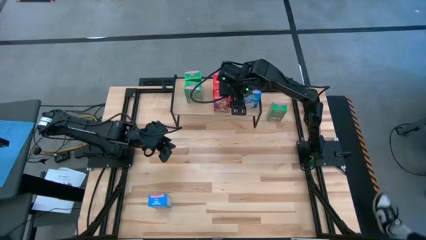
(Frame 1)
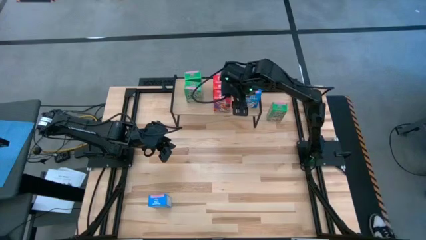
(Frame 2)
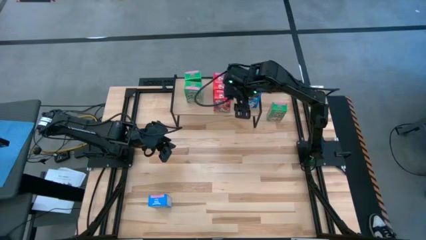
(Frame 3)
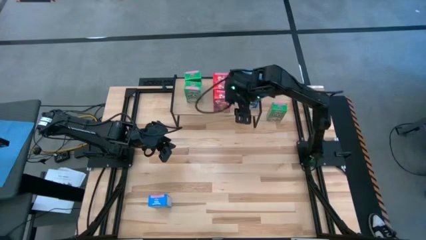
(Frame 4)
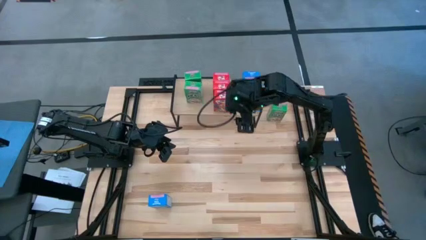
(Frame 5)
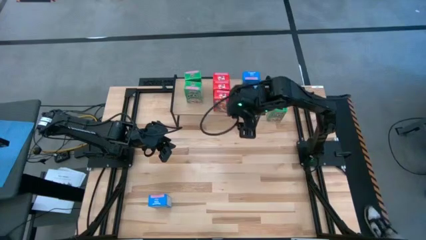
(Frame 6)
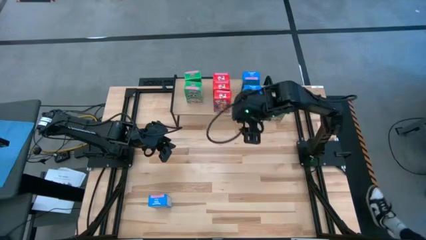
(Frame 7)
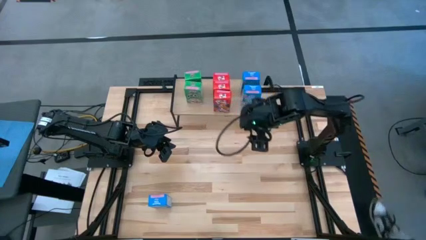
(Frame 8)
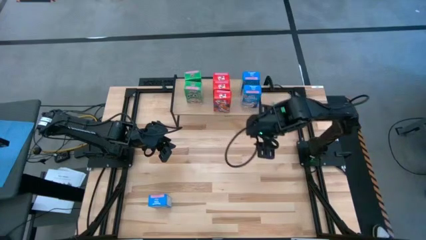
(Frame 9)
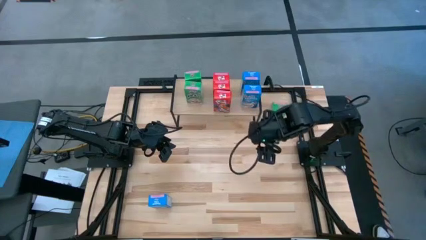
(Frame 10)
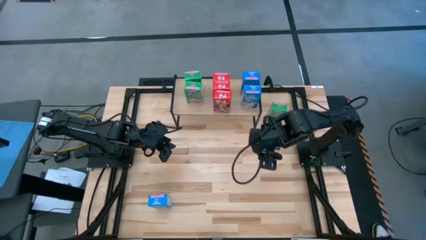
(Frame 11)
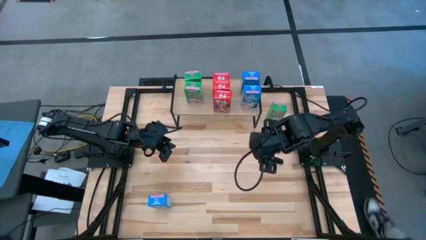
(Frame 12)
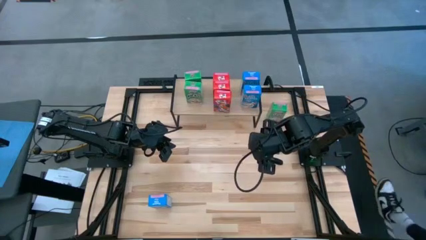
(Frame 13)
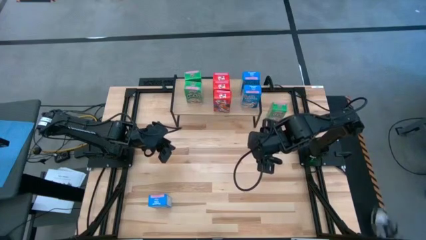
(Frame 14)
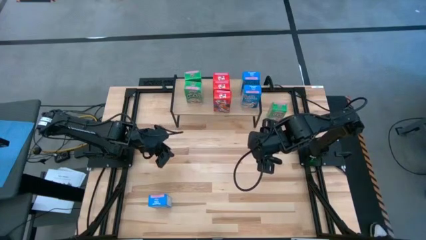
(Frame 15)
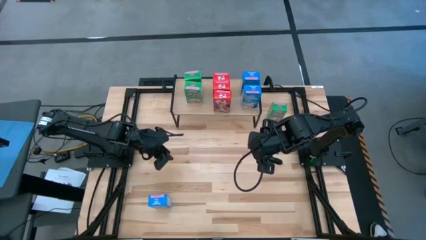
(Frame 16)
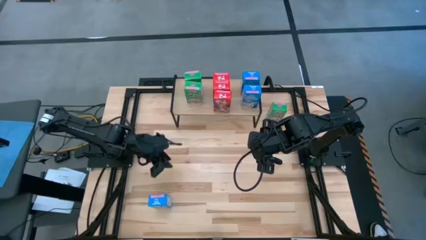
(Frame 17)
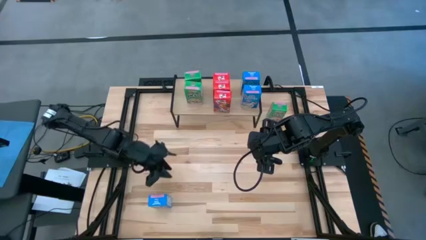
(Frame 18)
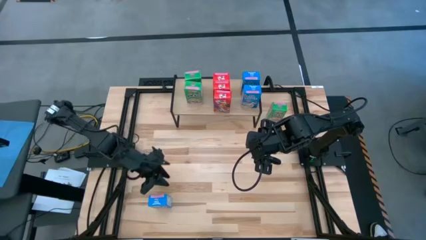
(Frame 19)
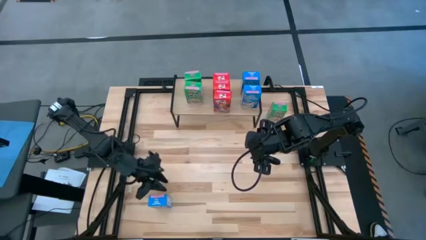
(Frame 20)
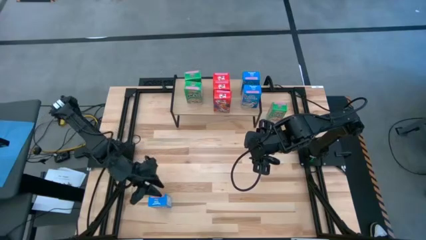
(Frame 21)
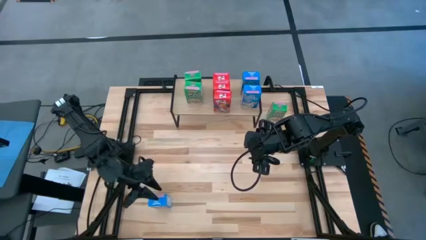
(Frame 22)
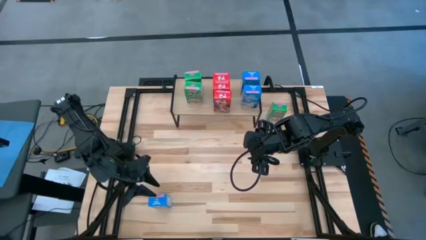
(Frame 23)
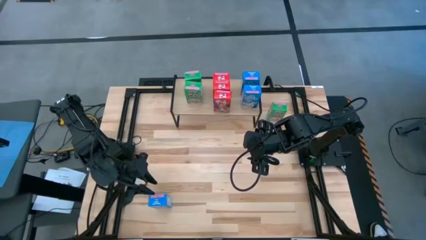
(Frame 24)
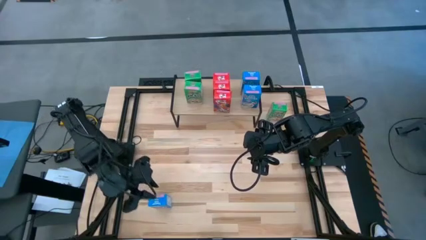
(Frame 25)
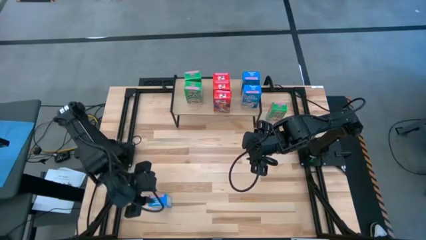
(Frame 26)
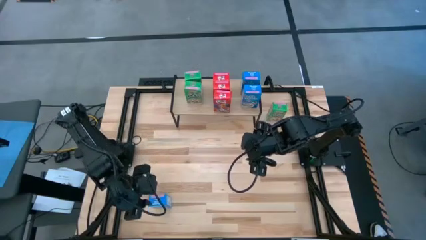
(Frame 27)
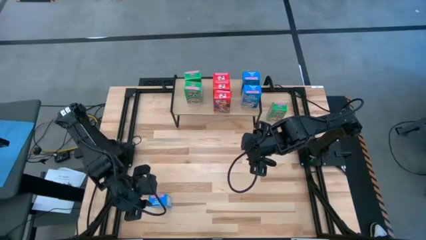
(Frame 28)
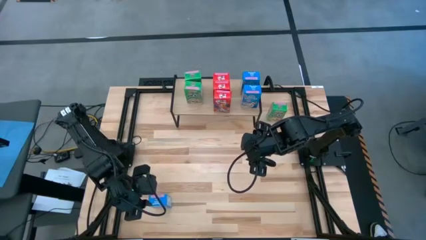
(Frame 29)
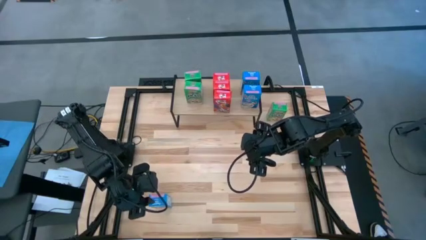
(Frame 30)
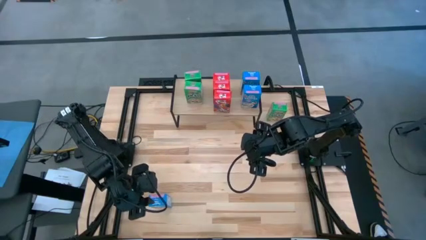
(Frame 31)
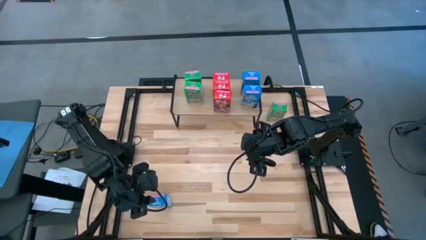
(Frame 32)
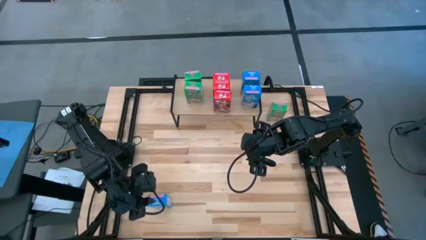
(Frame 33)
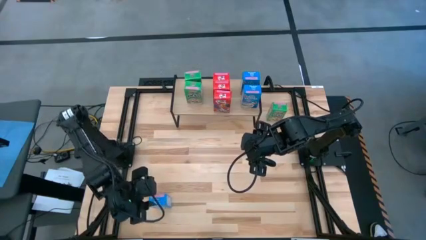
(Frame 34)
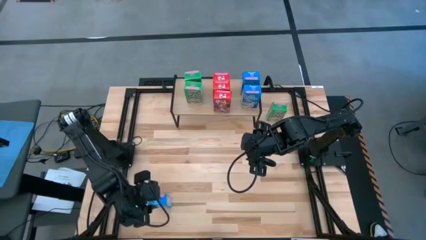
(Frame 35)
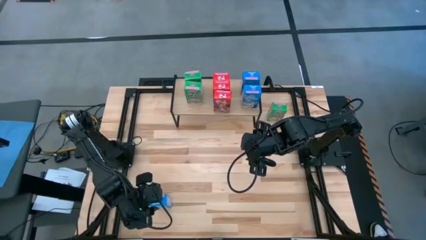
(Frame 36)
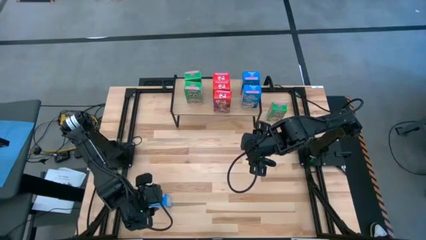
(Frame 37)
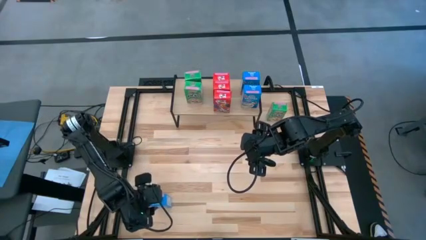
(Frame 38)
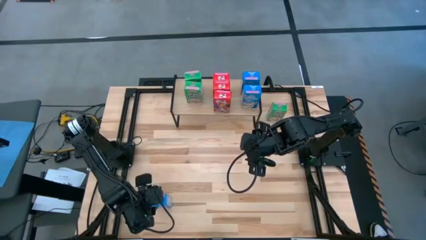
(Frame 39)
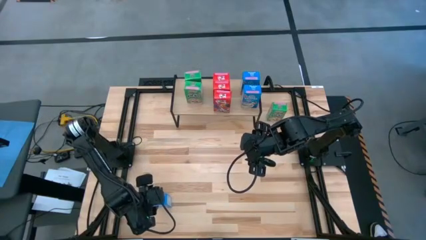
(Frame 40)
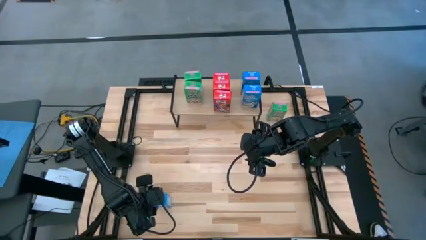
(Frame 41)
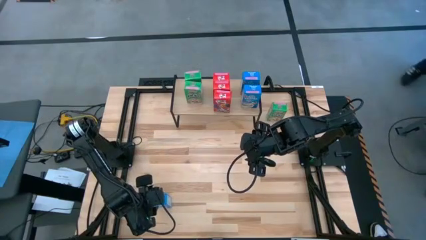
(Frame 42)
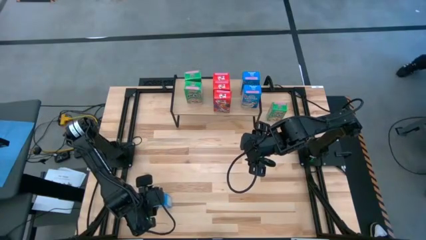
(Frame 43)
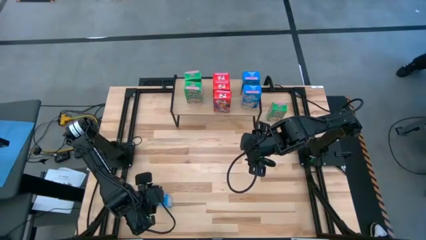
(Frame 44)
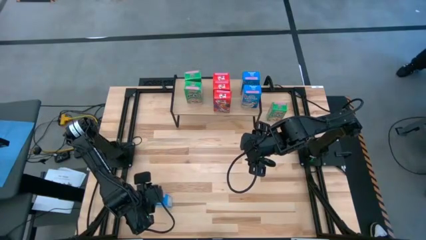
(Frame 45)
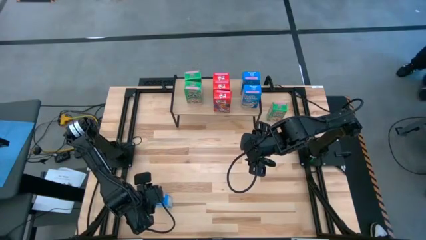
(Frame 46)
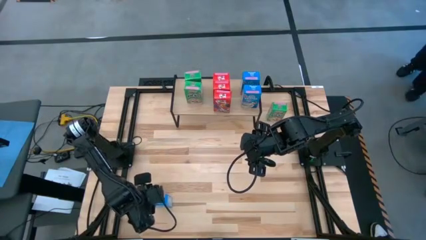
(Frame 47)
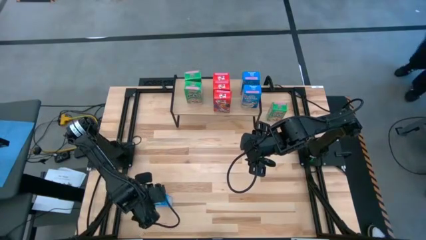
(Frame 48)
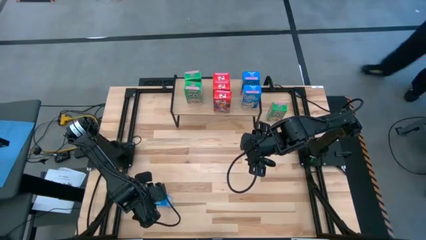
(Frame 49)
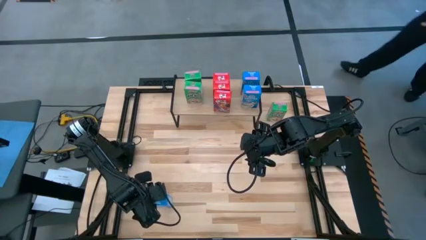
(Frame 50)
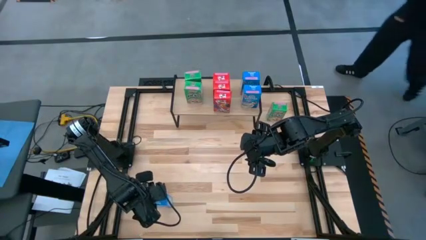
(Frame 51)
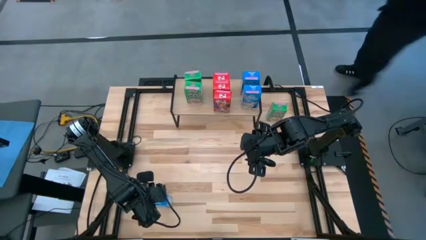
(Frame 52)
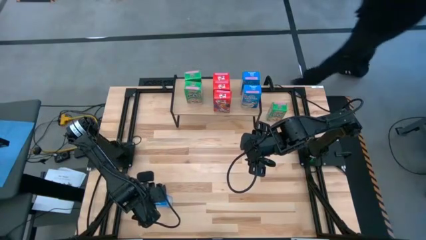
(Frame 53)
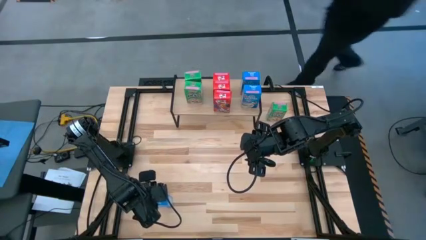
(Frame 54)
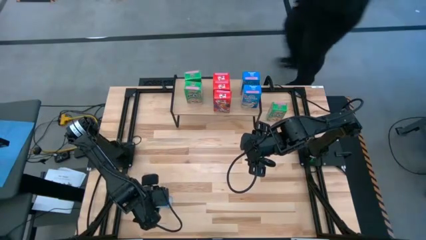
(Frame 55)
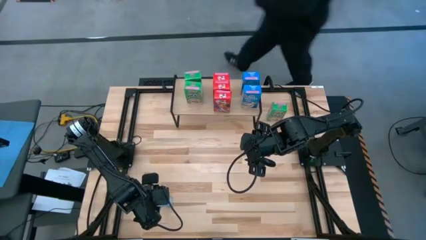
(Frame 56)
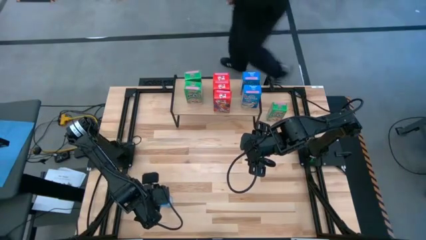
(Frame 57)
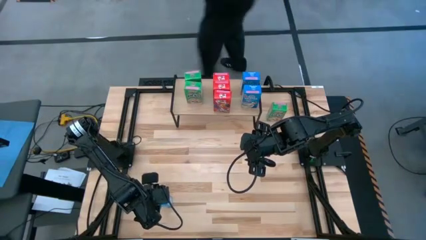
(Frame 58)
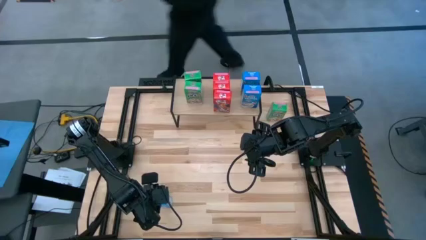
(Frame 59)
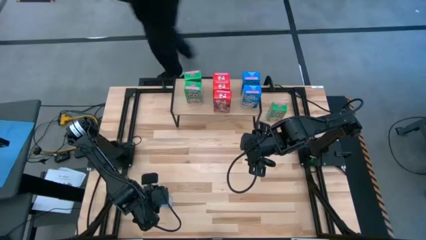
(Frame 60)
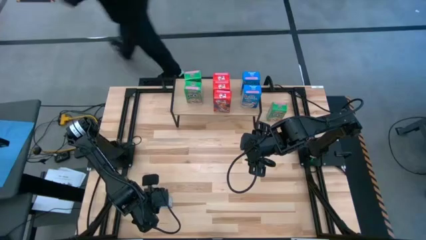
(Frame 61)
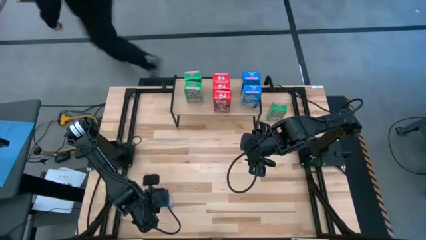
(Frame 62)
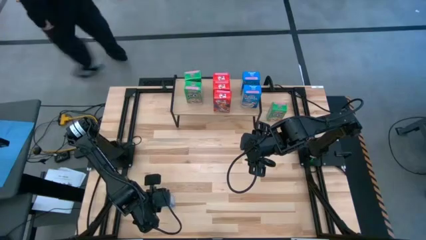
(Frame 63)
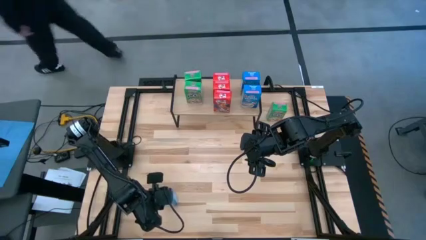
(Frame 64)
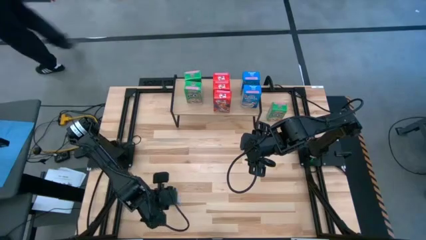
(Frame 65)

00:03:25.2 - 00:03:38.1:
Task: Stack cereal on shelf
Put the blue cereal box on the shelf aligned with the other blue cereal boxes

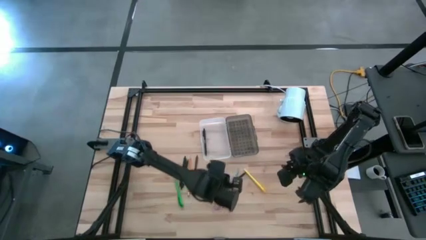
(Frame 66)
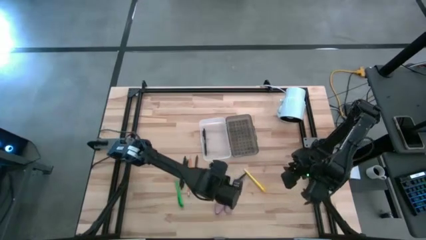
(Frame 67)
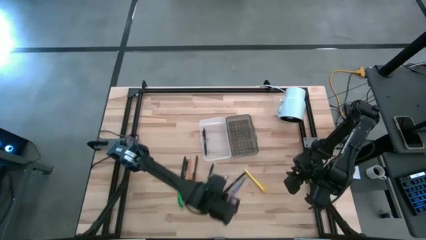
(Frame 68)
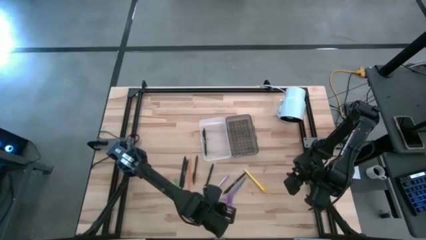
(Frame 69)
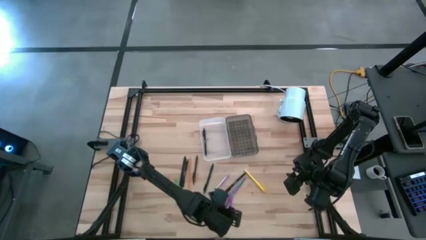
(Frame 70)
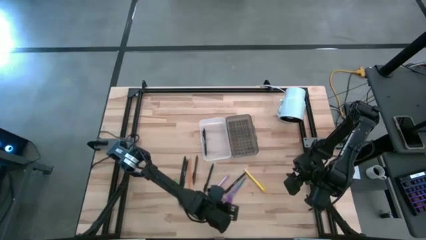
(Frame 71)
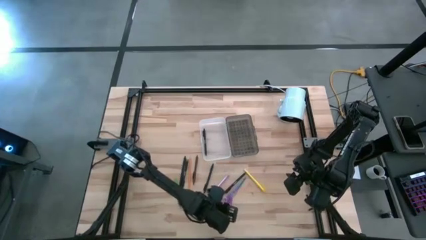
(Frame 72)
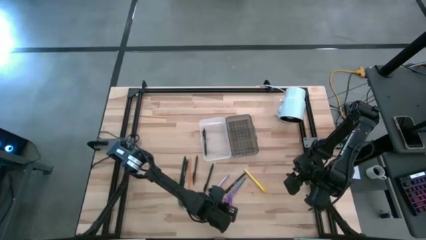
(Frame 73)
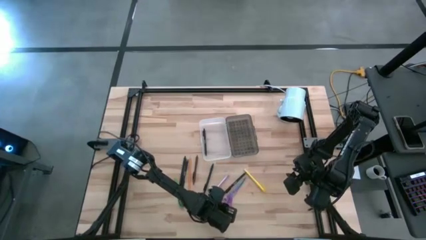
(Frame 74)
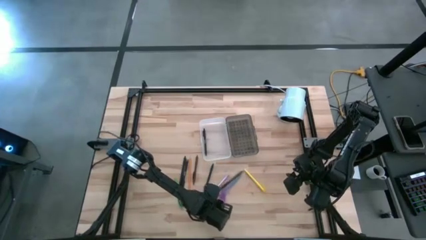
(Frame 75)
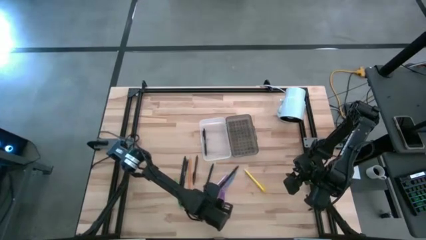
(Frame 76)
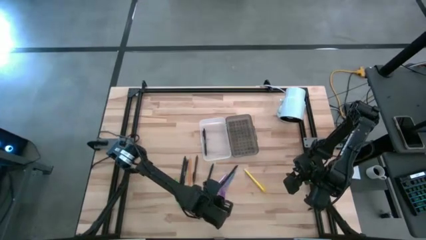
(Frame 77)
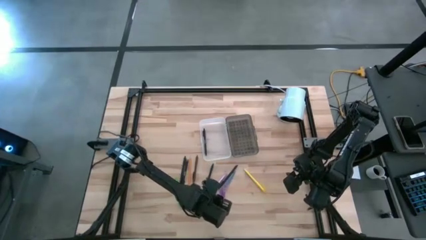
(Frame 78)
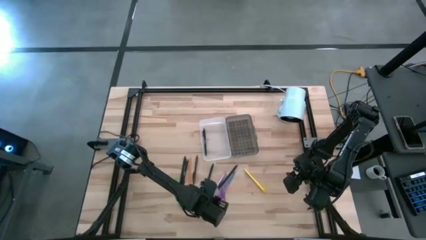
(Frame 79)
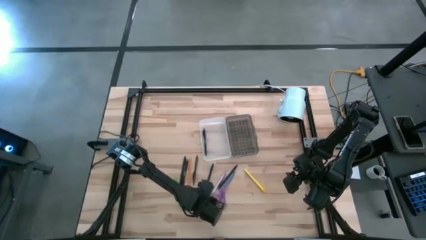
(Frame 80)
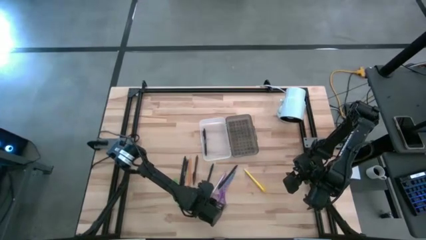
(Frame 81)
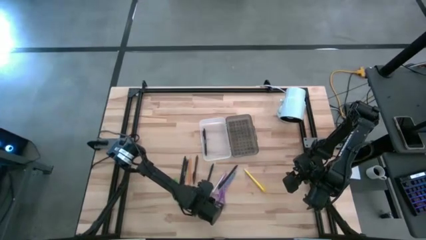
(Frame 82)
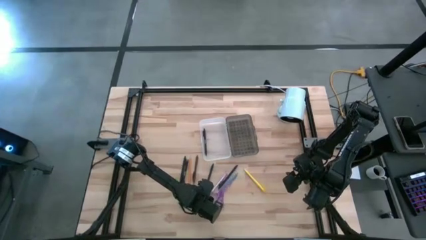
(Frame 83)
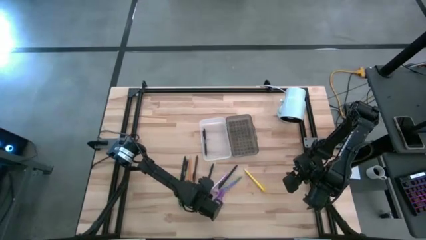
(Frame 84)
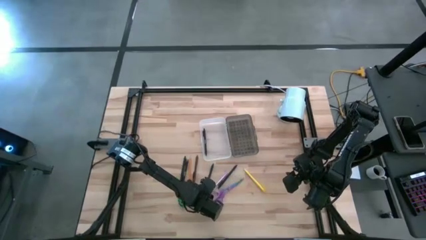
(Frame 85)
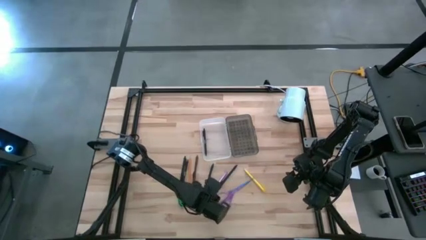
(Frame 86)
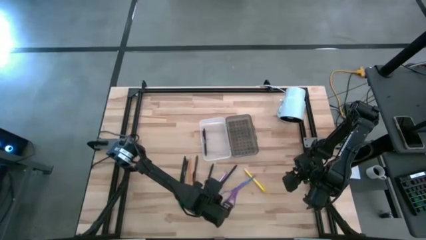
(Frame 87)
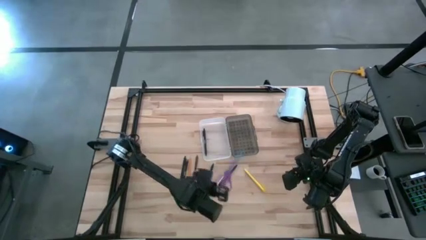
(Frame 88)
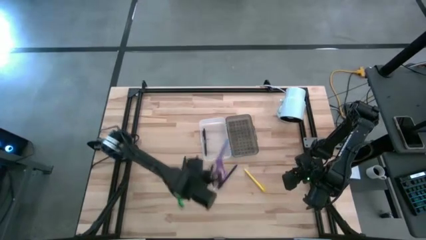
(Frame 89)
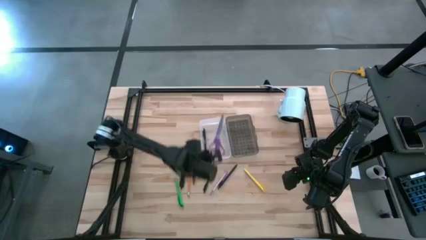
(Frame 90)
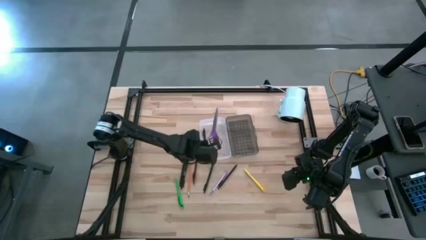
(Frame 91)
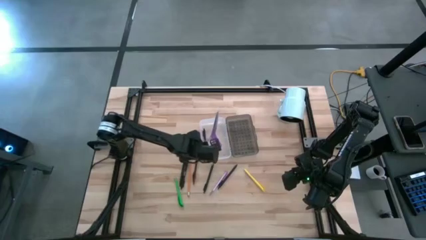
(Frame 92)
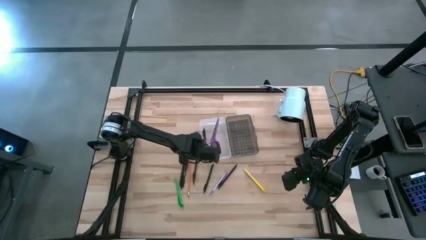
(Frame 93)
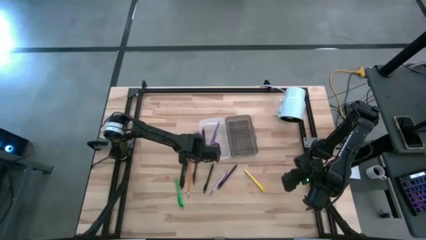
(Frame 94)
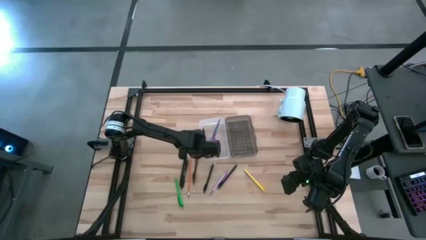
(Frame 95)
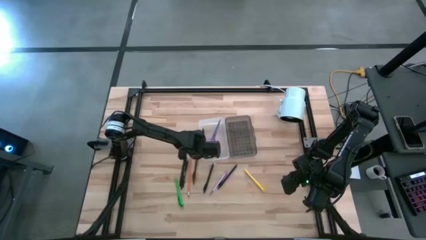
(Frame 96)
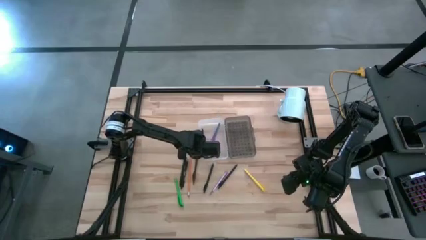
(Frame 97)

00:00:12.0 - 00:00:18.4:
Task: Pick & place school supplies into a supply box
Put the violet scissor into the supply box
